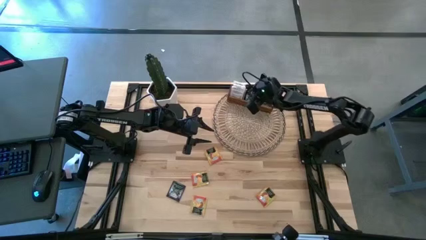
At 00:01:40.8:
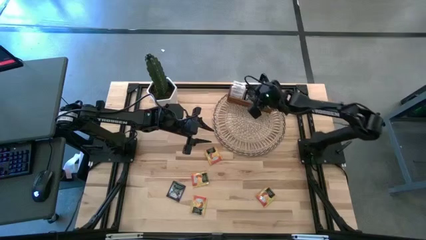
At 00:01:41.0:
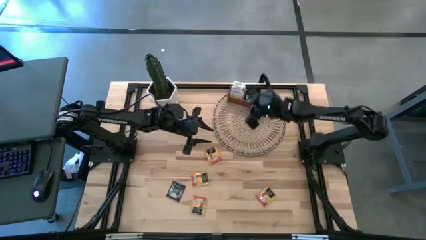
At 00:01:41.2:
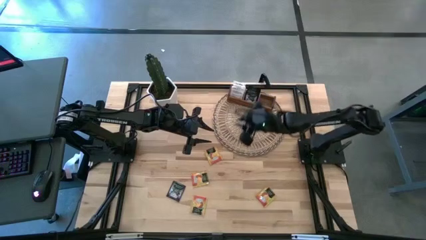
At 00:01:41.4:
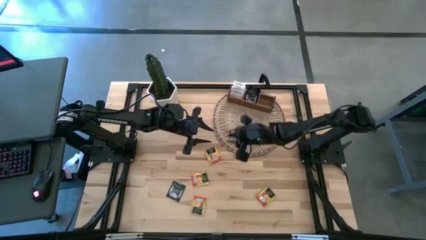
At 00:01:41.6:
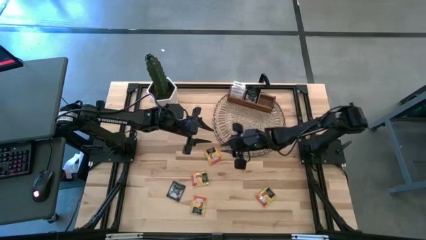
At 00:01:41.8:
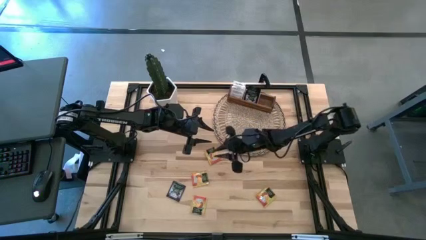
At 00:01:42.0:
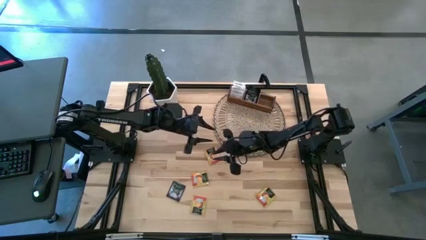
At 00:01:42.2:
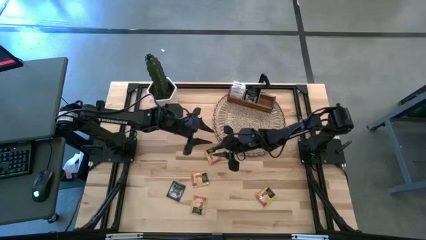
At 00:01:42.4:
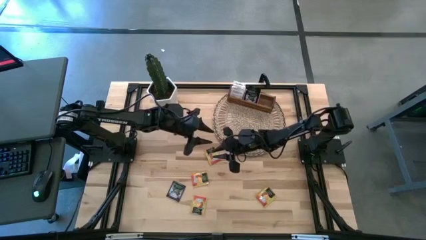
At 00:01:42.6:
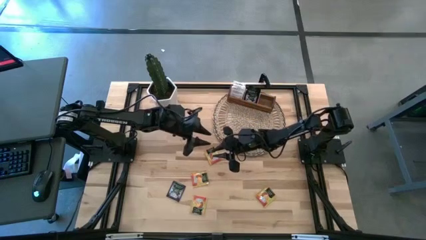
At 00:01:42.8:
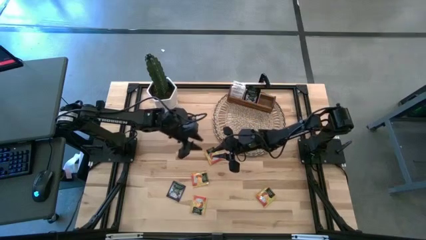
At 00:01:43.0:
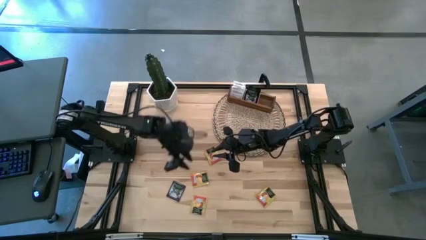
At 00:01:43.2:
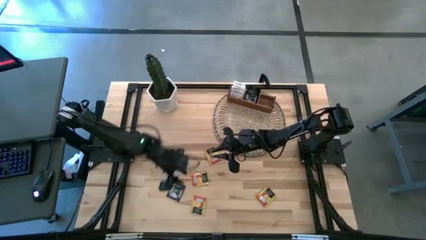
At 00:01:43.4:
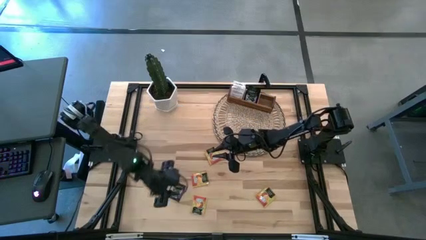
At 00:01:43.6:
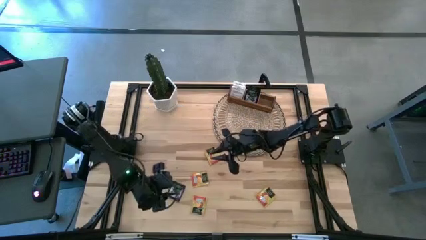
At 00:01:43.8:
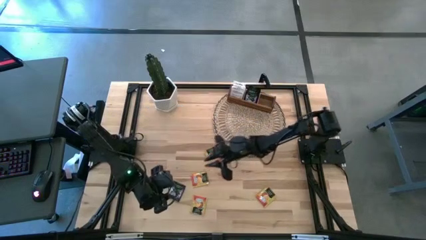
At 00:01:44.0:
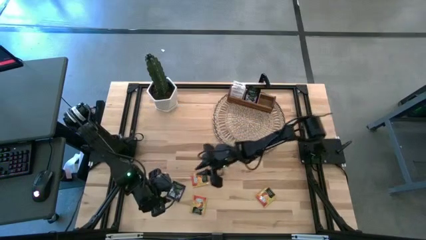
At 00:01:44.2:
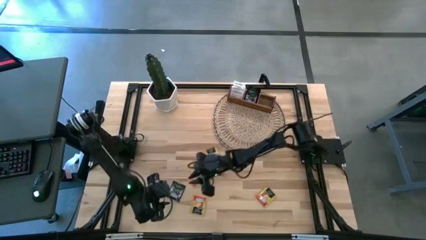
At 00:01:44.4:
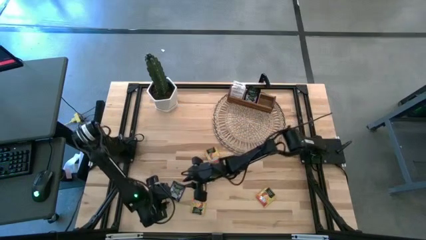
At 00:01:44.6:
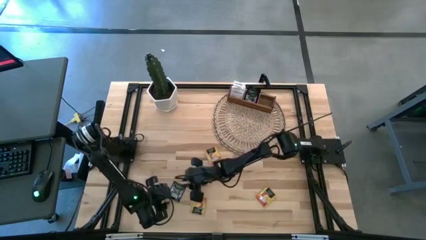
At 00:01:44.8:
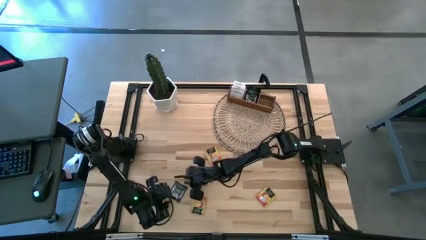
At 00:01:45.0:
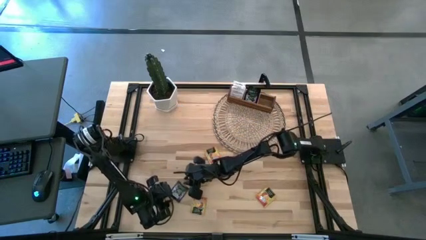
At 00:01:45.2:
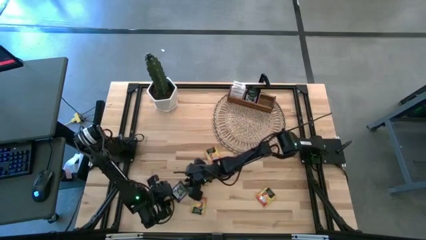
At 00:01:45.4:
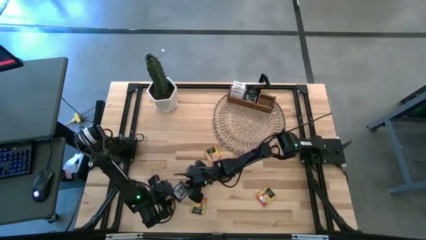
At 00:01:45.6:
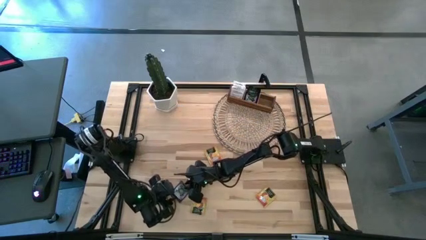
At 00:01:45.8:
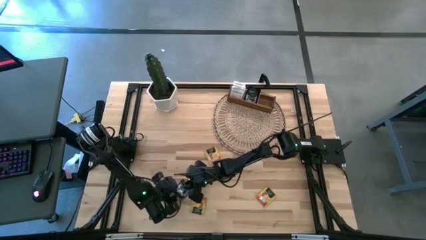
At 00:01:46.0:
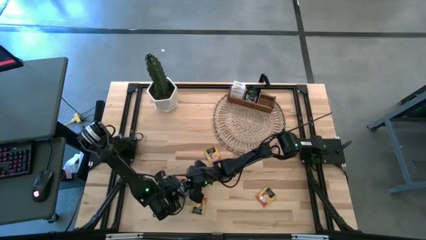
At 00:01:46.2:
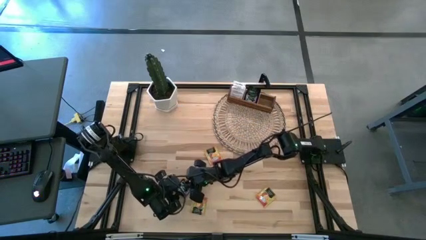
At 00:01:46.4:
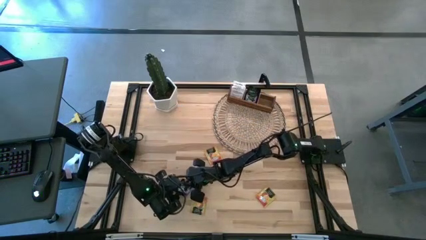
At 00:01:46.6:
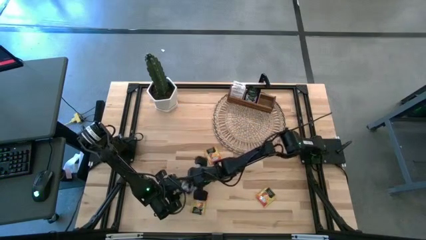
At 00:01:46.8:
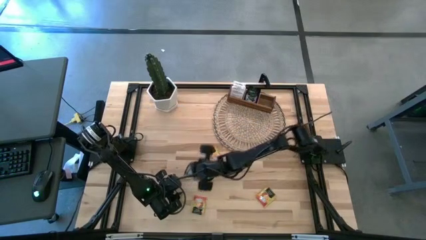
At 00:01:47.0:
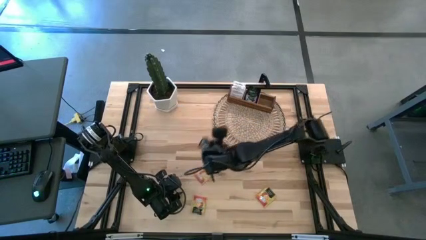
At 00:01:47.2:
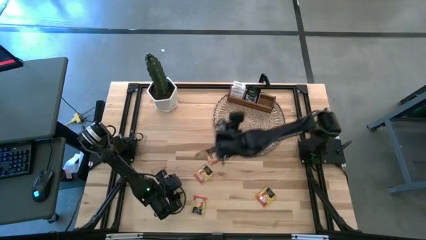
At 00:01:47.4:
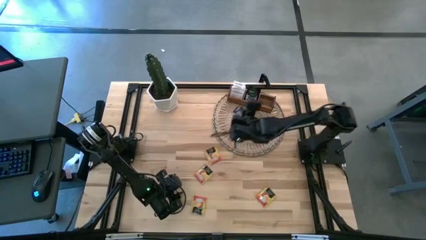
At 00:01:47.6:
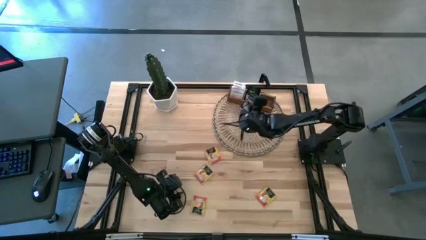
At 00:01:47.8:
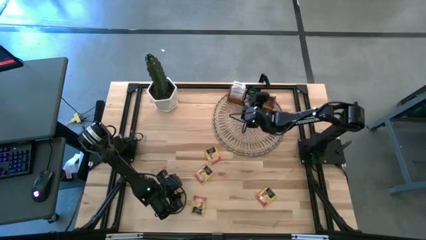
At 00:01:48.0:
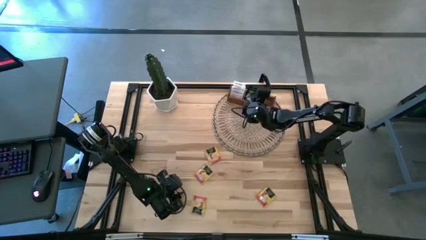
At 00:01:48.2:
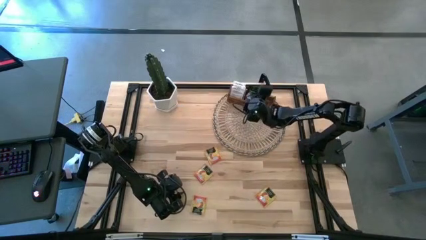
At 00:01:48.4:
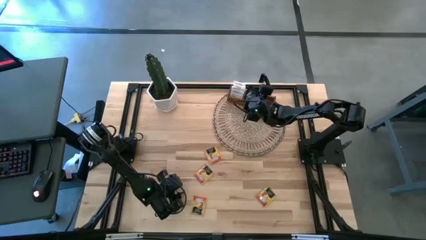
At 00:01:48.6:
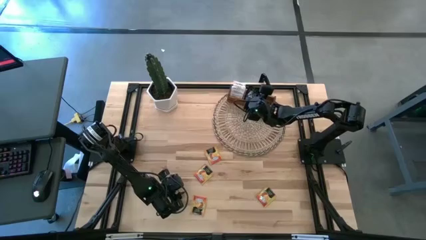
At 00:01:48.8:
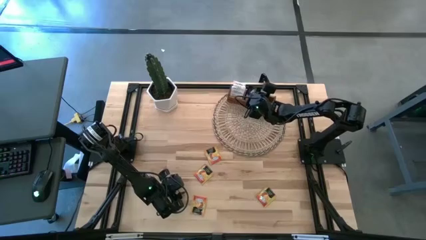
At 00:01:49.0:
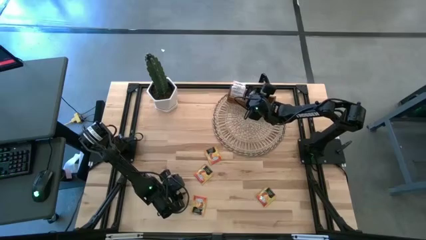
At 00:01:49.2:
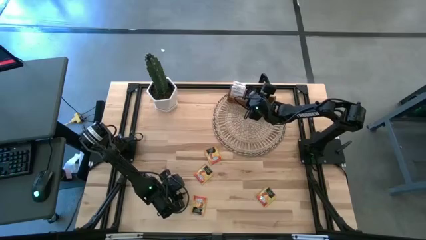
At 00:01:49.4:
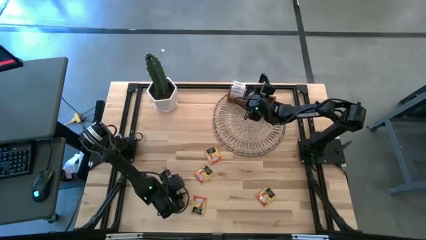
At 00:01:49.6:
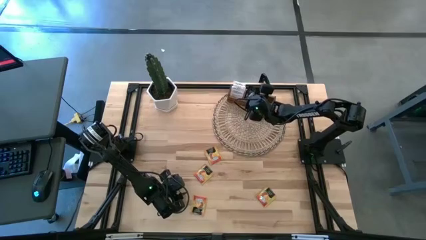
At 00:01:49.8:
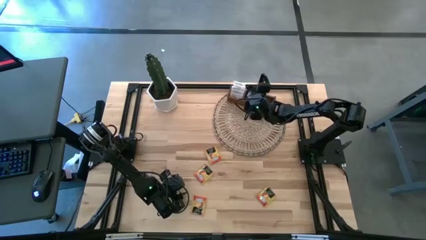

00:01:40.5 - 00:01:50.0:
Task: Pick & Place Tea
Put the blue tea bag into the middle section of the wooden organizer

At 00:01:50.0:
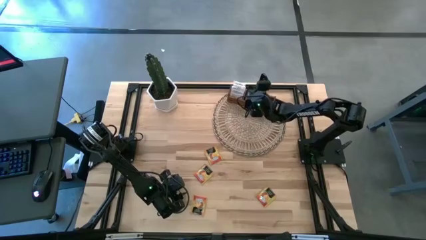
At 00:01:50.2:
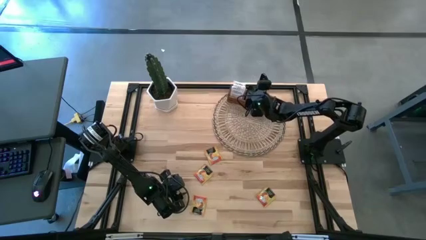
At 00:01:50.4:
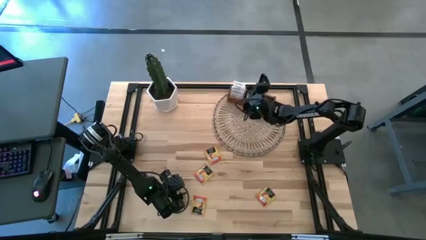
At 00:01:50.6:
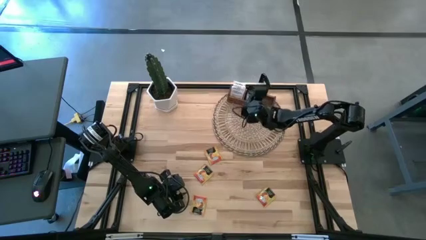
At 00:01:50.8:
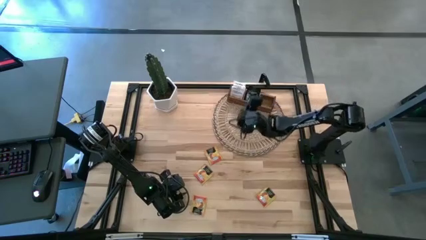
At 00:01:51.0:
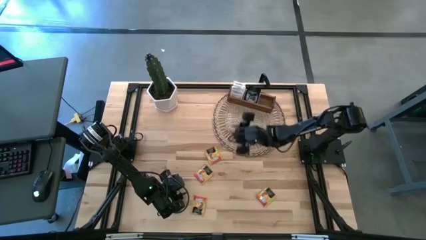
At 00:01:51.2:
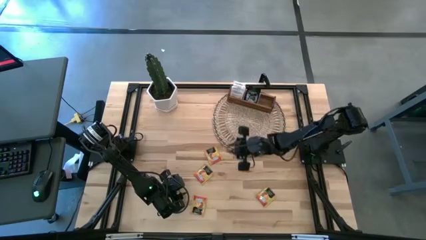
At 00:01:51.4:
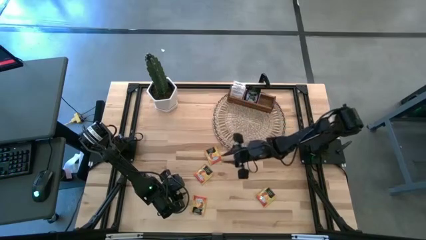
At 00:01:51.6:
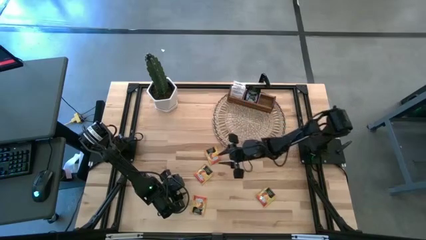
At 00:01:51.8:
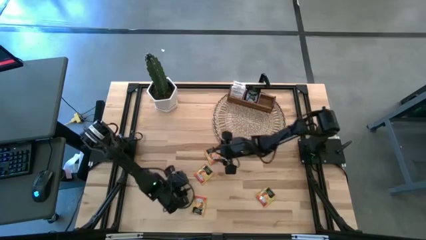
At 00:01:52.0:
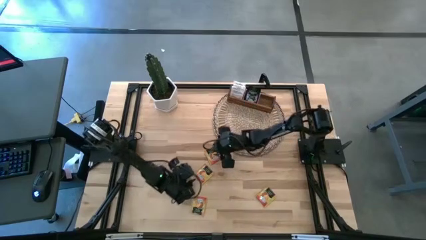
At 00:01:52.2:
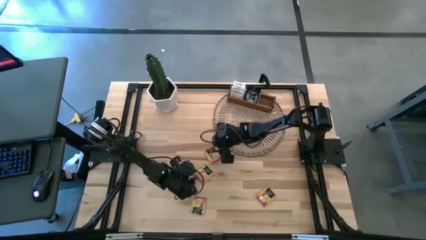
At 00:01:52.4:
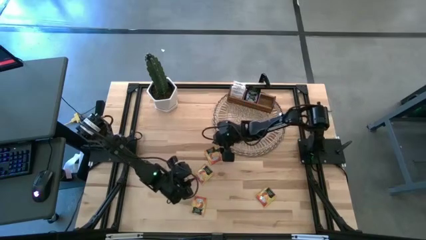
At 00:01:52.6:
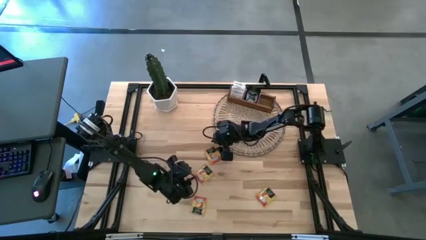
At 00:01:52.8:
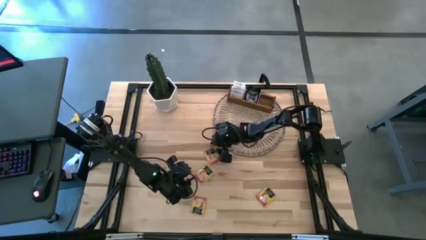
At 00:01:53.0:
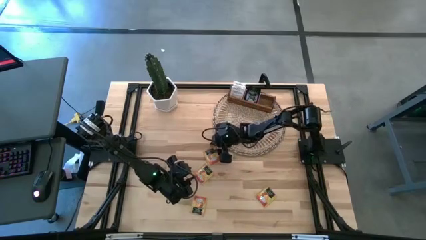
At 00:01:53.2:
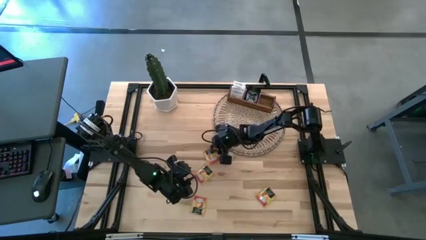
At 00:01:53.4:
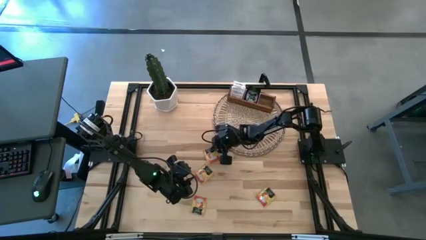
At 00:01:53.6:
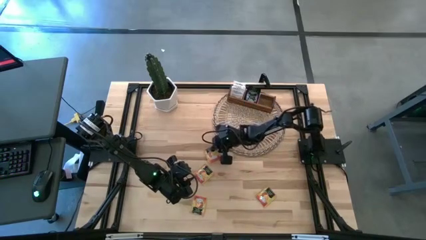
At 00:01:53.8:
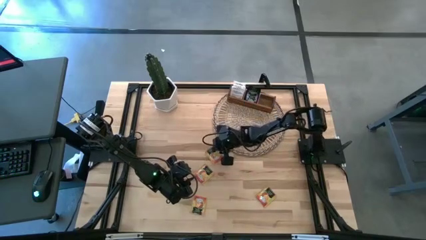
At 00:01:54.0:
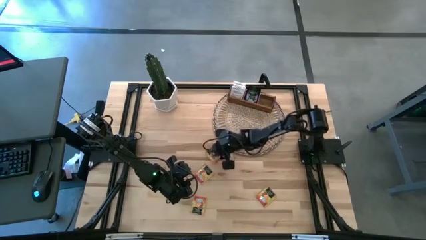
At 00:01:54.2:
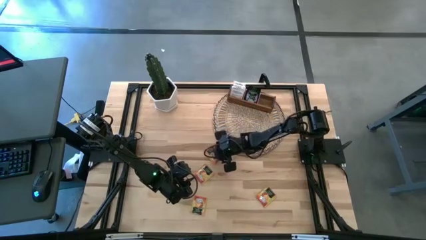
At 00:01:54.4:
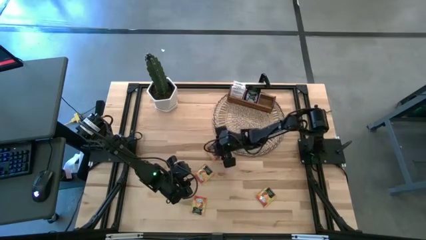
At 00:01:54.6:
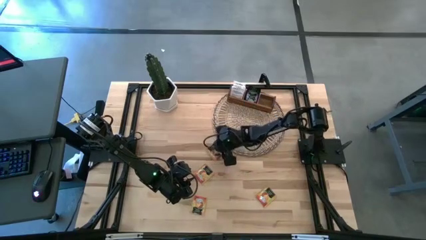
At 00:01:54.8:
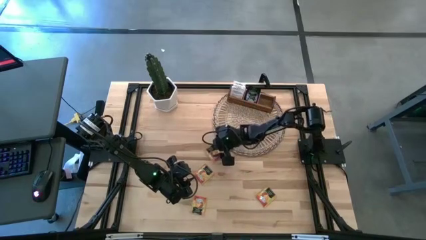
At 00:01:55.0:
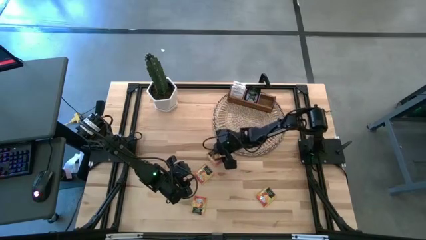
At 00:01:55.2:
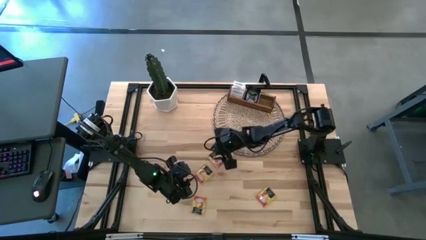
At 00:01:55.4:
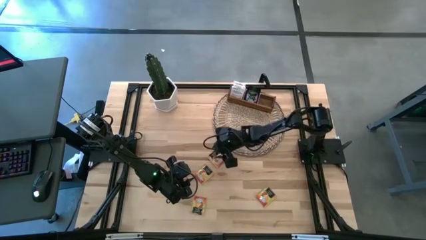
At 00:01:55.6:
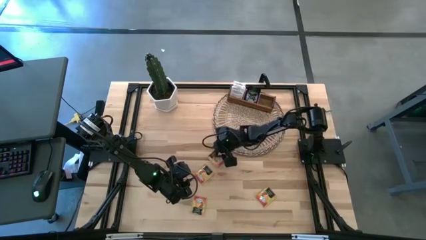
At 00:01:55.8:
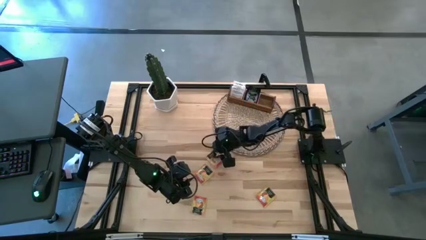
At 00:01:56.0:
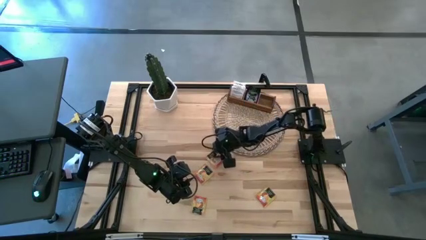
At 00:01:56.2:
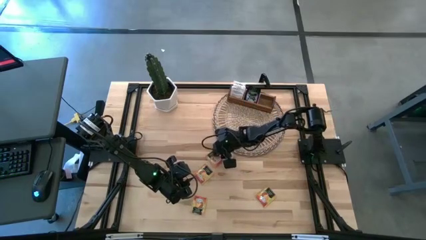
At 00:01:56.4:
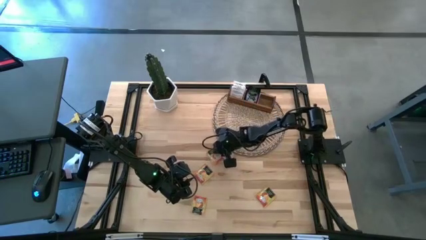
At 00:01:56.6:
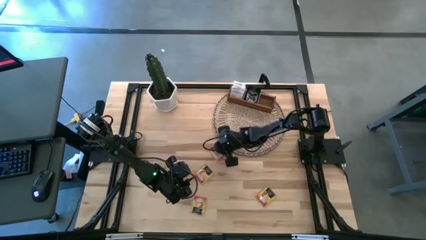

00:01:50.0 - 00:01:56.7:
Put the yellow tea bag into the right section of the wooden organizer
